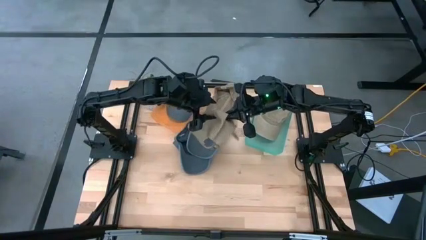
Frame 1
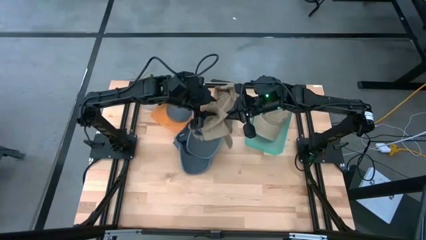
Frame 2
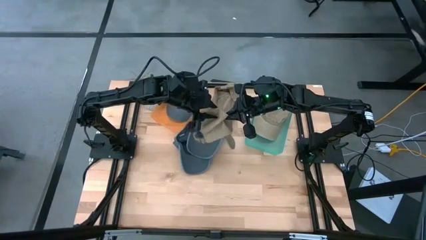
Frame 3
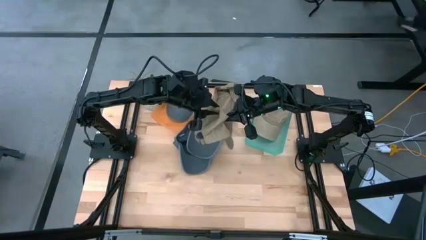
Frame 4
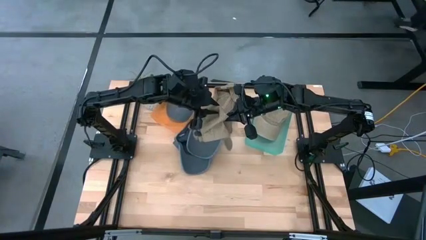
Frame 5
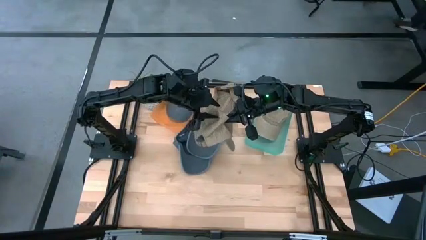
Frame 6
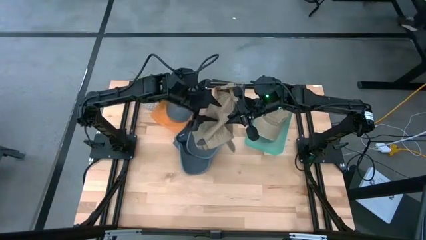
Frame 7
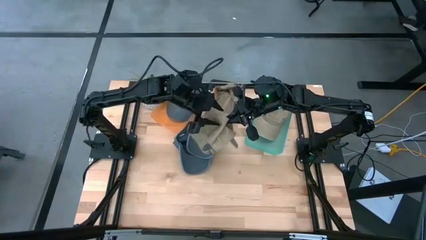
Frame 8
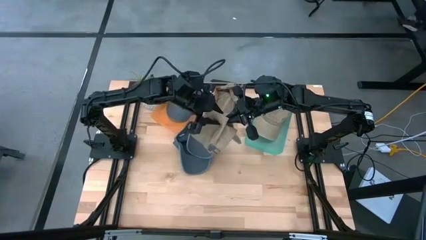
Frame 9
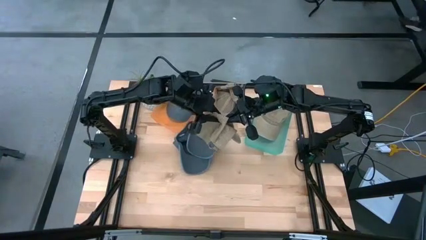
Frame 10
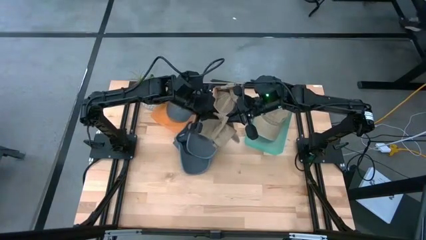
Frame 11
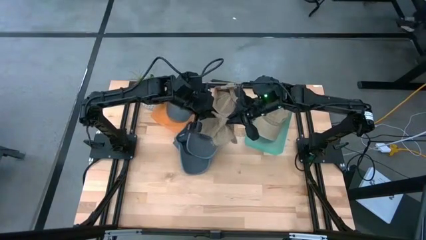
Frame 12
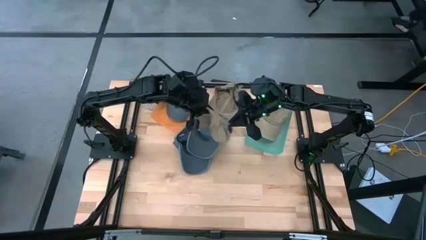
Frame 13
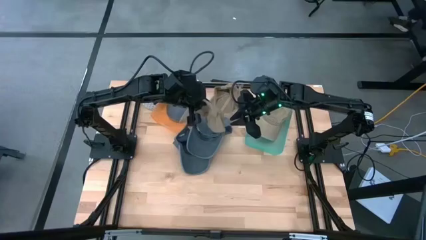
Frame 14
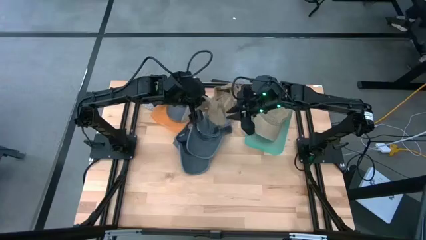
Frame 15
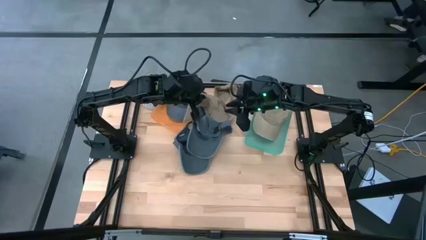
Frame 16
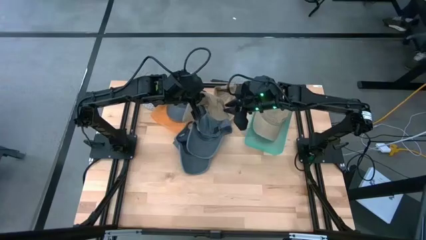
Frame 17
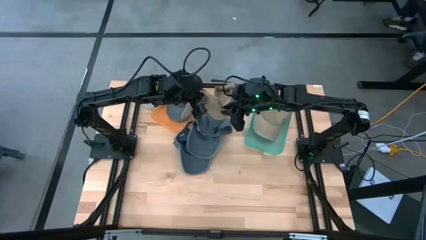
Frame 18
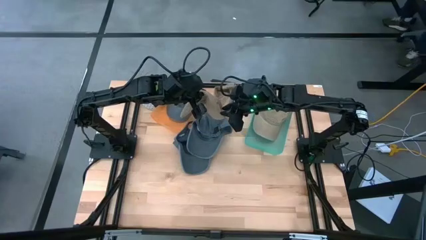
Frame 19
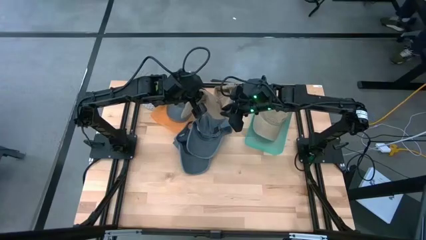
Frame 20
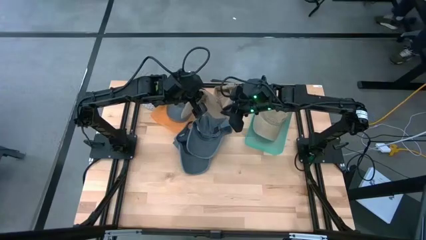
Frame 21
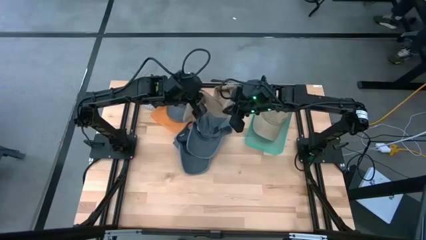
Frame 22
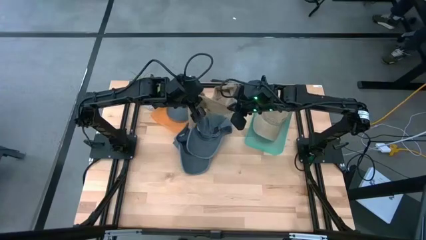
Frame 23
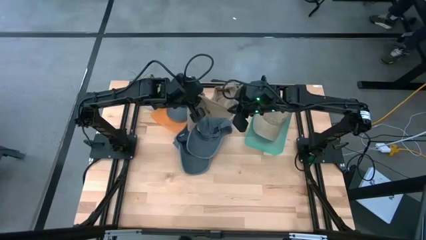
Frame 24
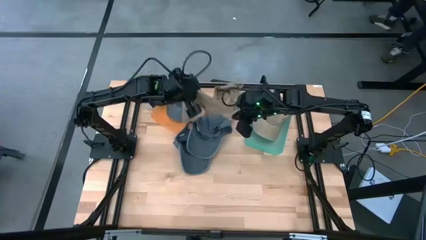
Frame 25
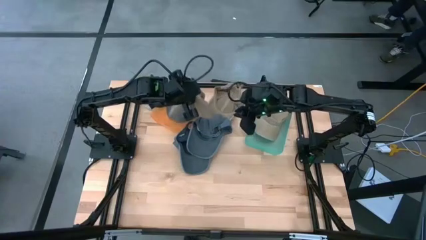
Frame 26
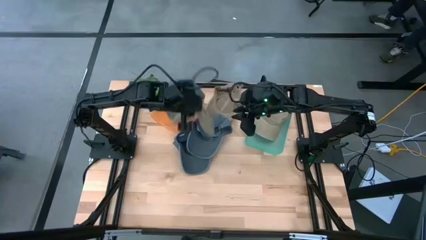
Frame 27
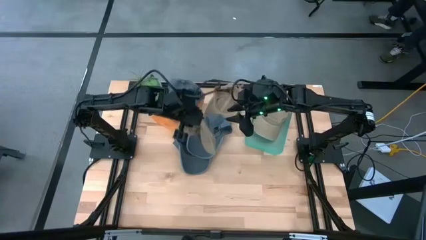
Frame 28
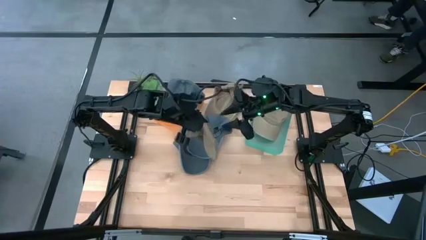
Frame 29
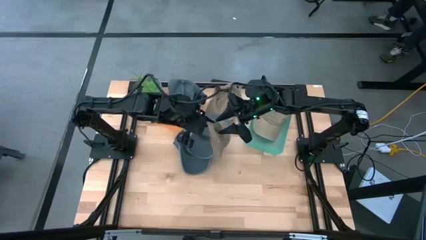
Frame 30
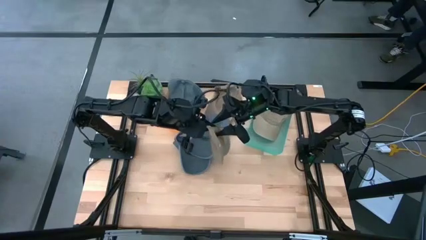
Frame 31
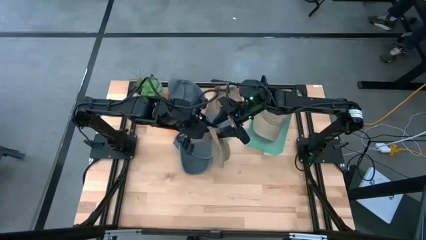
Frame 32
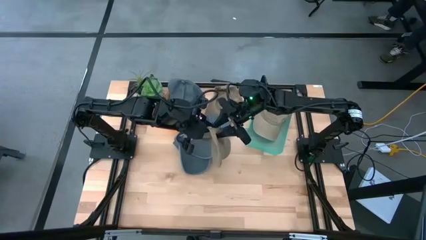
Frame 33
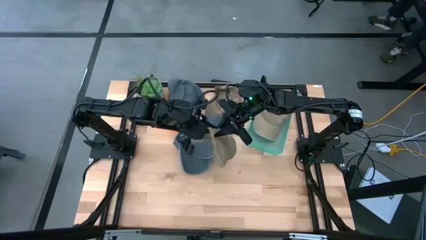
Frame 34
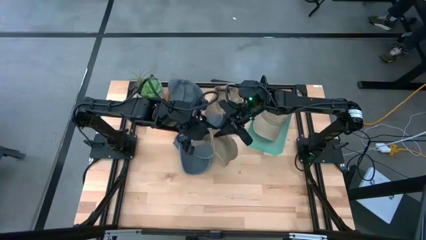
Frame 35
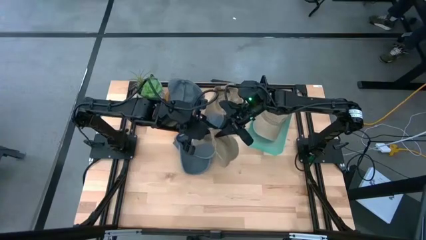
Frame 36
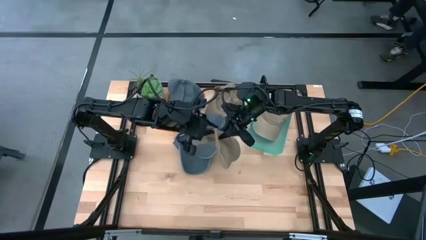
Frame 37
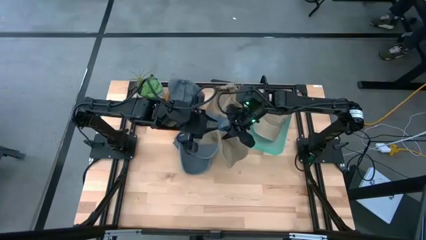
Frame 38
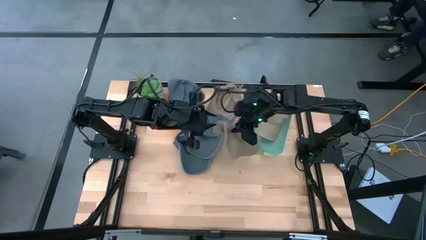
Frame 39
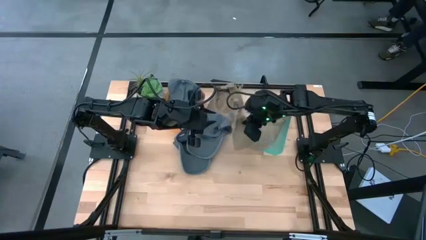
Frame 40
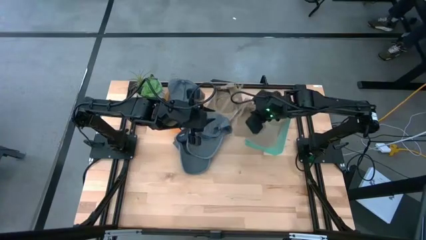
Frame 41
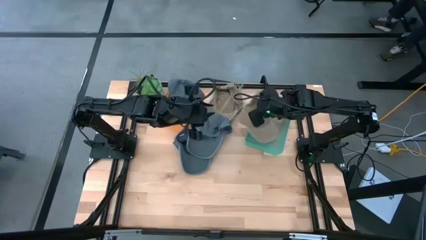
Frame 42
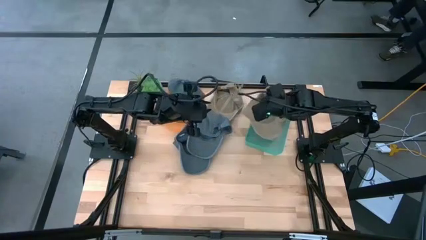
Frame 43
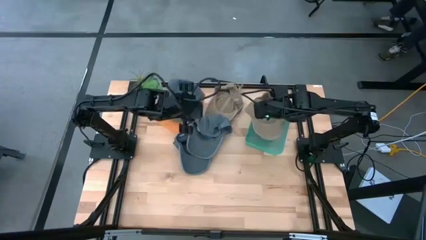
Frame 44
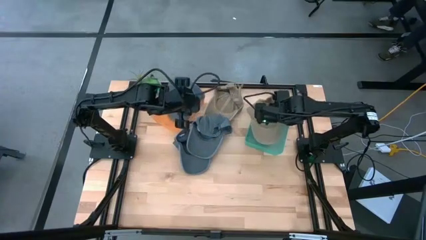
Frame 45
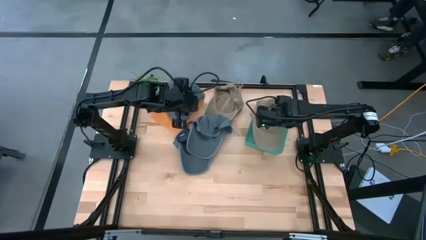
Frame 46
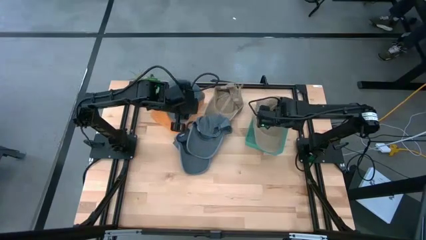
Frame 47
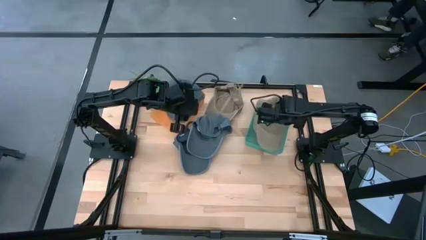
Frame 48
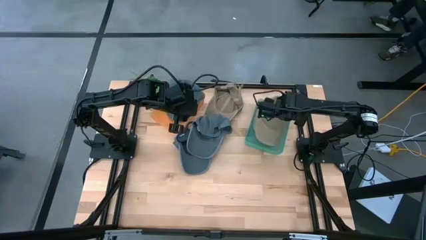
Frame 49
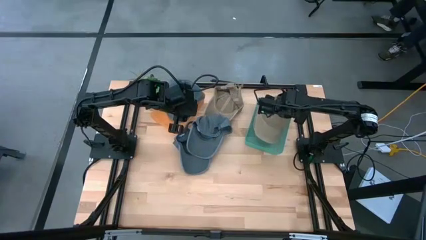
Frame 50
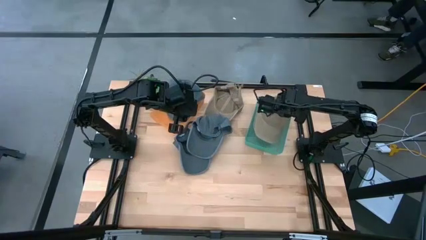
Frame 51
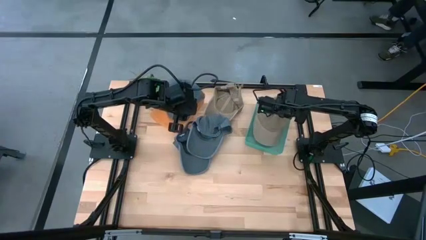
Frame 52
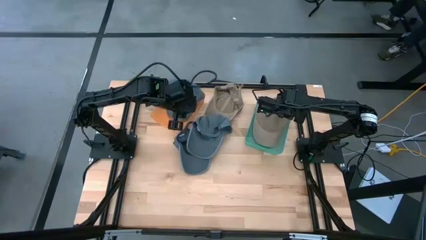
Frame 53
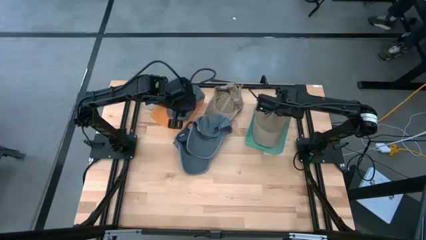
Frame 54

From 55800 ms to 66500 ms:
Task: Pick & Place hat
Put the brown cap into the blue bin

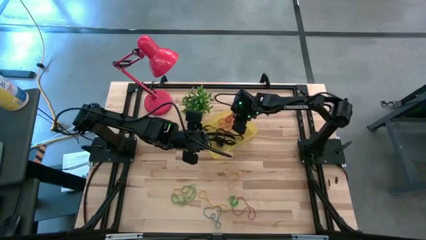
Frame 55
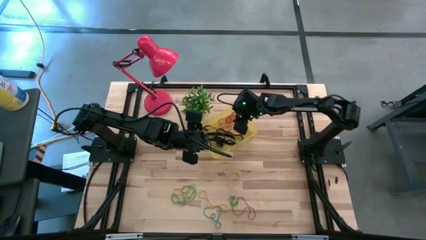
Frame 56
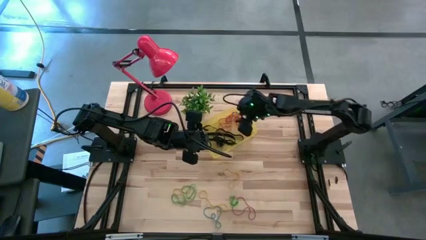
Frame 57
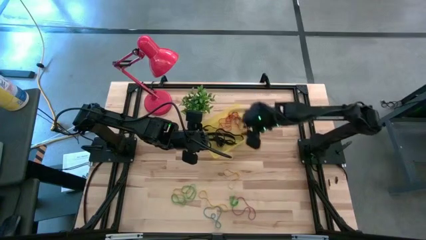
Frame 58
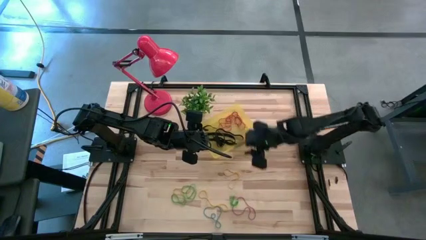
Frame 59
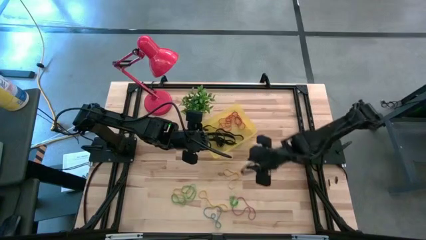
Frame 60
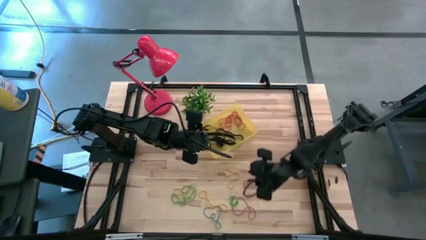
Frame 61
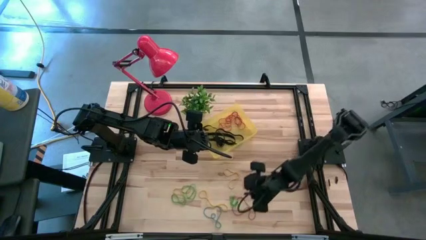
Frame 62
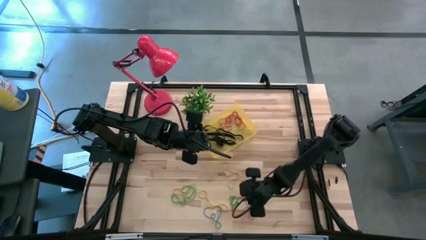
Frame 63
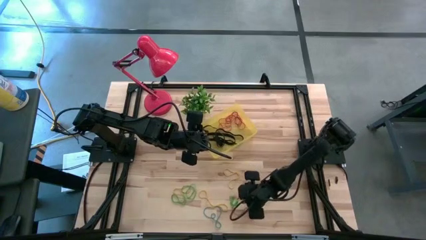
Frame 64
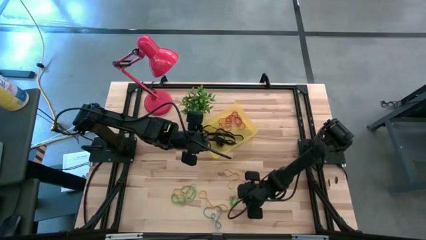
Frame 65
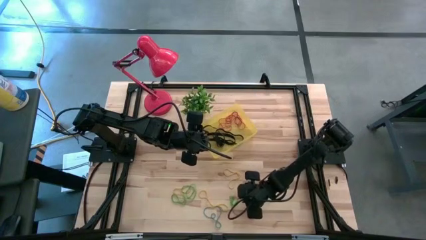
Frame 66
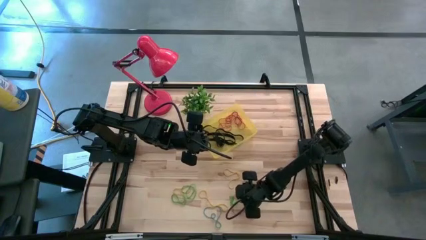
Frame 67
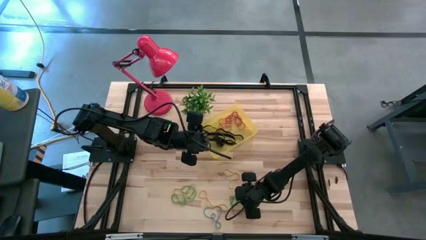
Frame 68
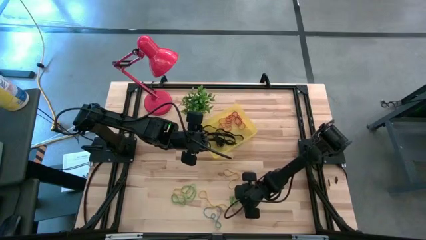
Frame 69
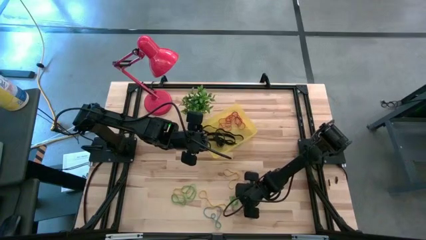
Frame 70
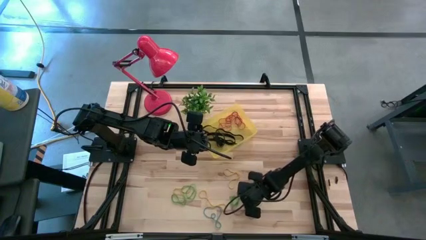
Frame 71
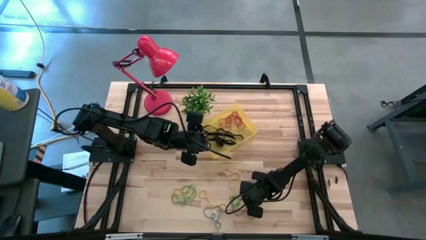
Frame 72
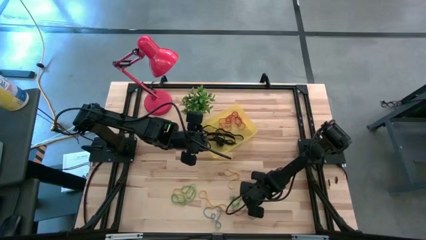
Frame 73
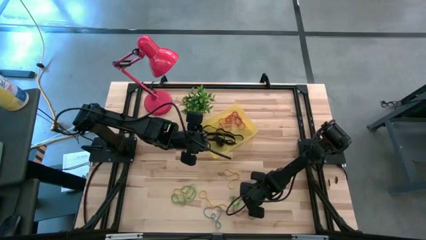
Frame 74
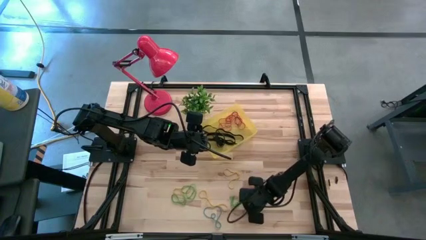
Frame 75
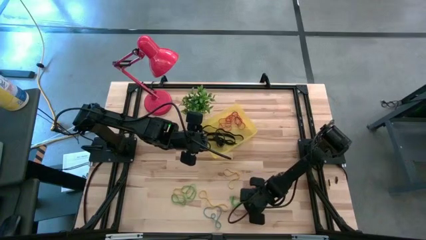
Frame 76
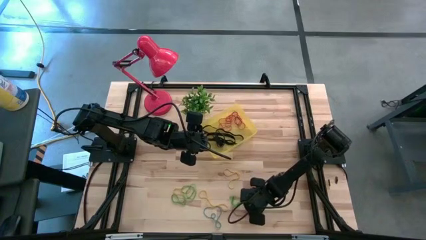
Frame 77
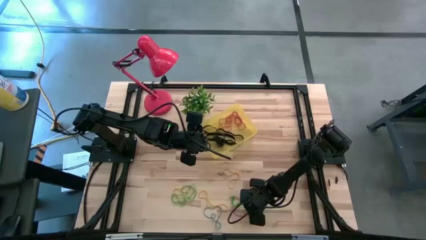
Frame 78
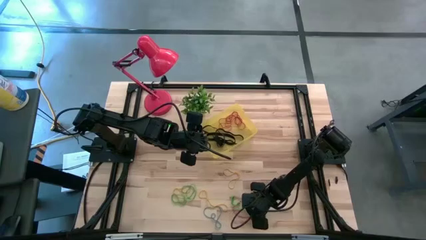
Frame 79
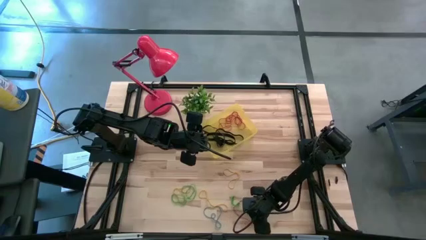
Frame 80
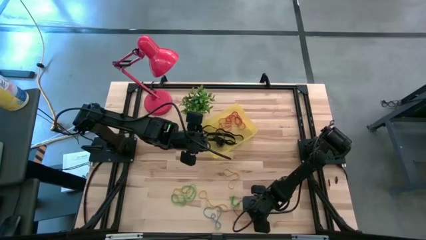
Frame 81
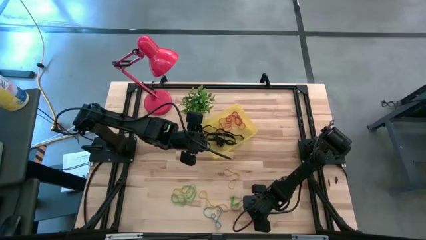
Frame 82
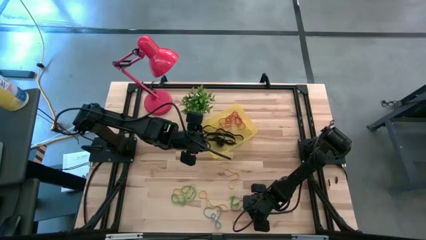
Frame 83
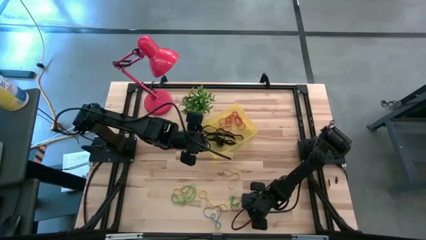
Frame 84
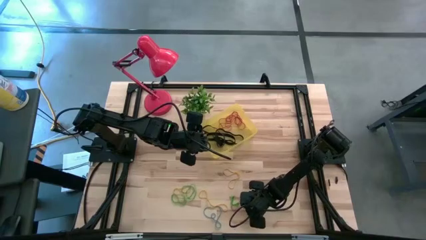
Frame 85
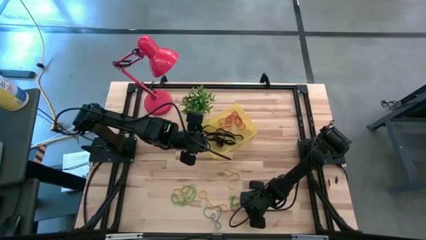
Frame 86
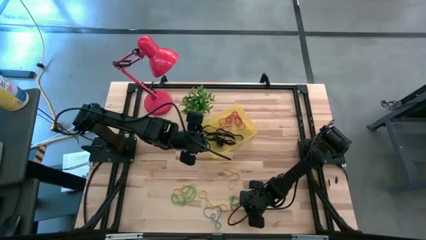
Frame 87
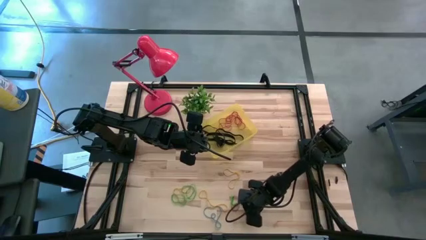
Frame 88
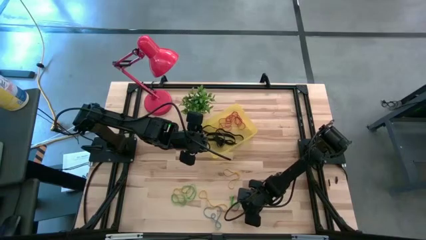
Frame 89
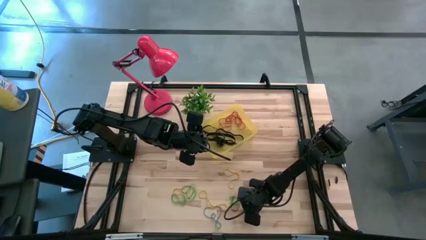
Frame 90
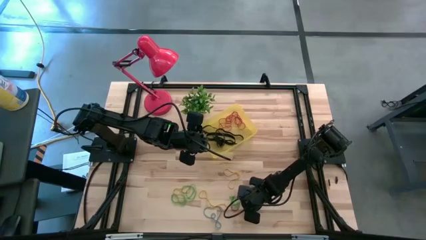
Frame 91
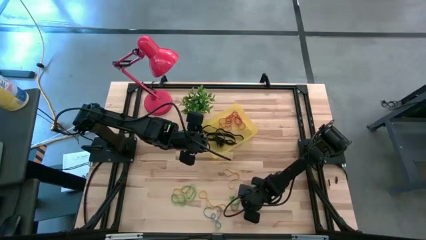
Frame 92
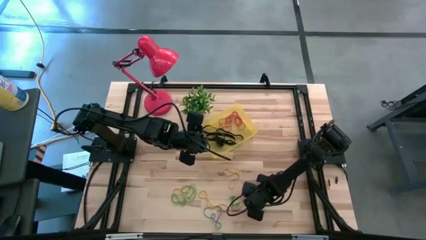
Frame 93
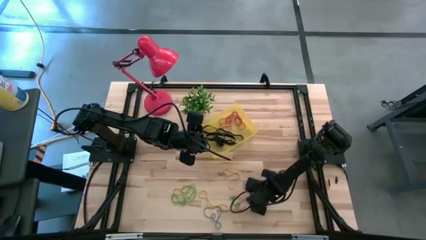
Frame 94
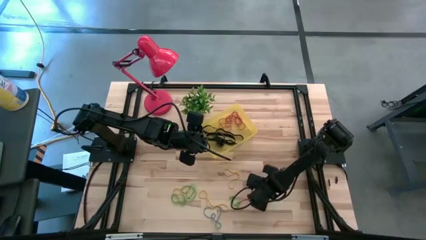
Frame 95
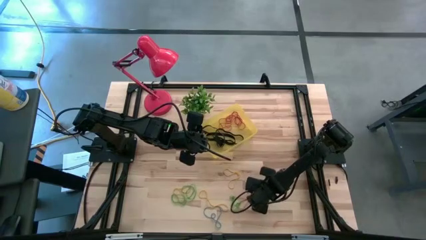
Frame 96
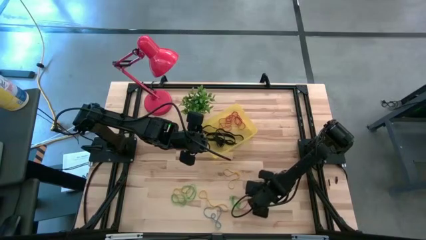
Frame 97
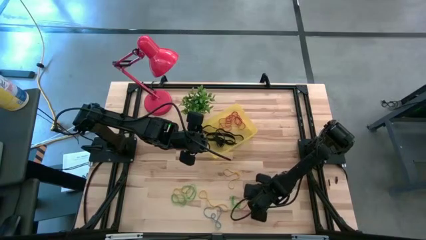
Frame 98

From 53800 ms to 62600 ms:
Task: Pick and place rubber bands into bin
Put the red rubber band into the transparent yellow bin
